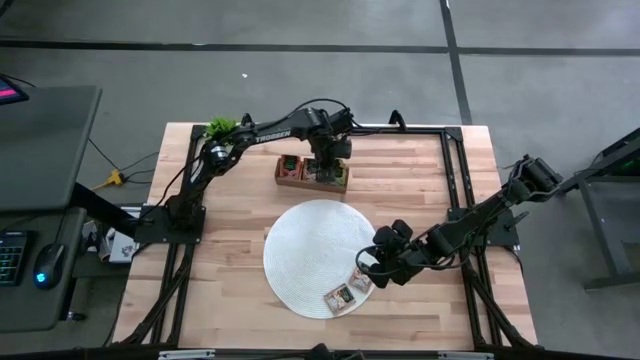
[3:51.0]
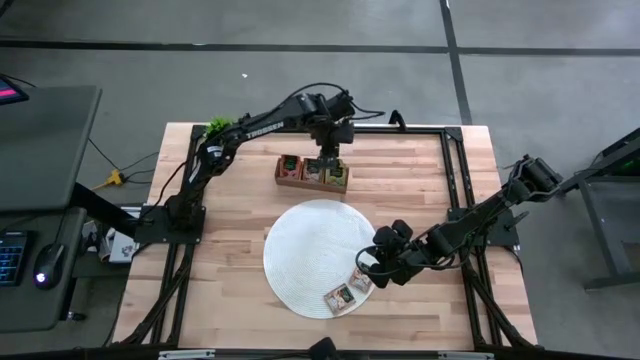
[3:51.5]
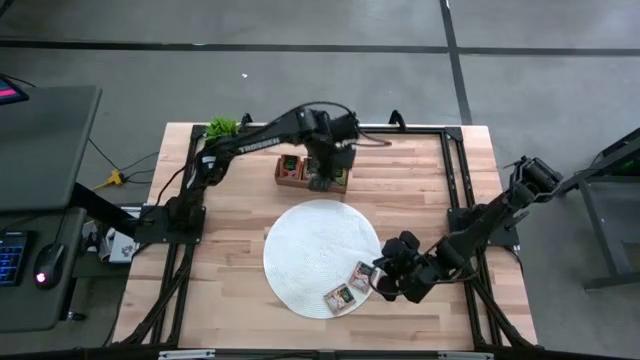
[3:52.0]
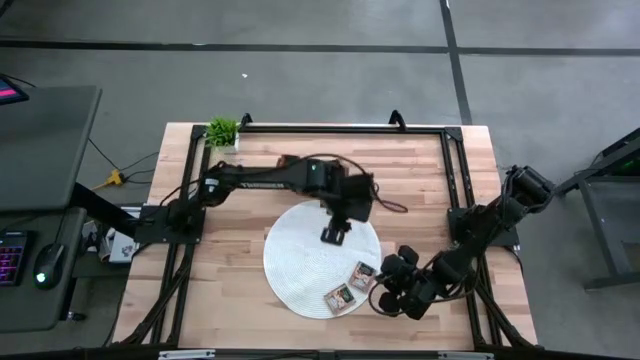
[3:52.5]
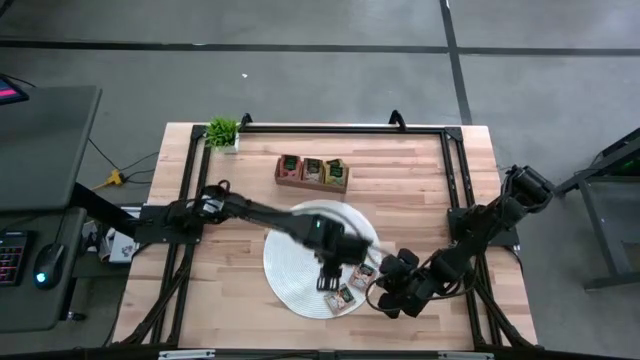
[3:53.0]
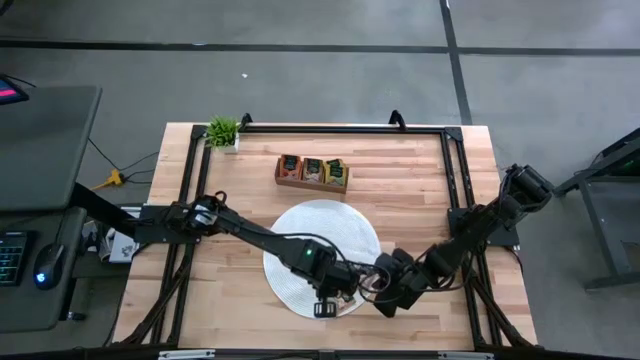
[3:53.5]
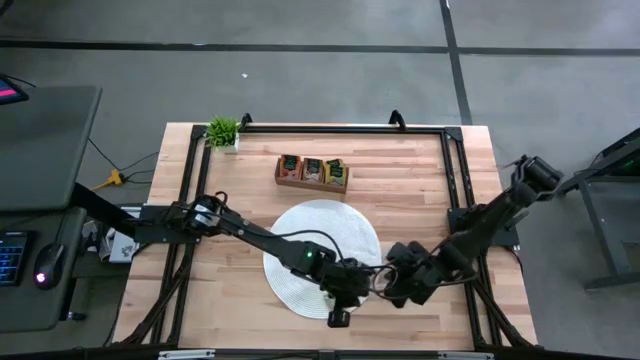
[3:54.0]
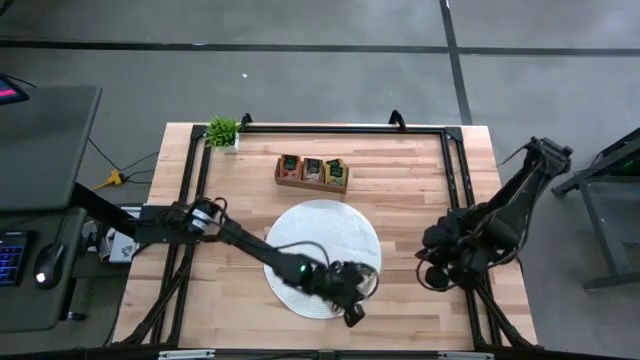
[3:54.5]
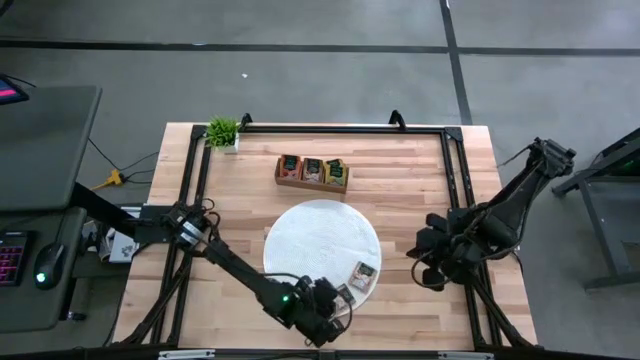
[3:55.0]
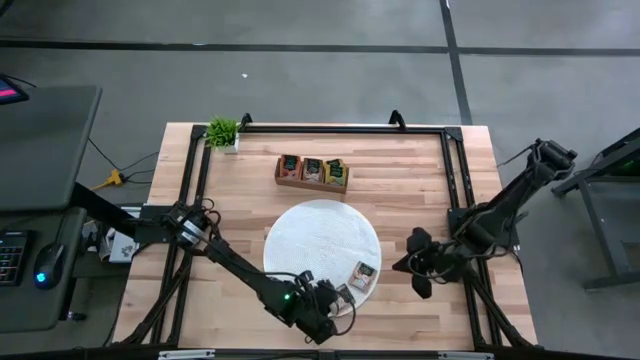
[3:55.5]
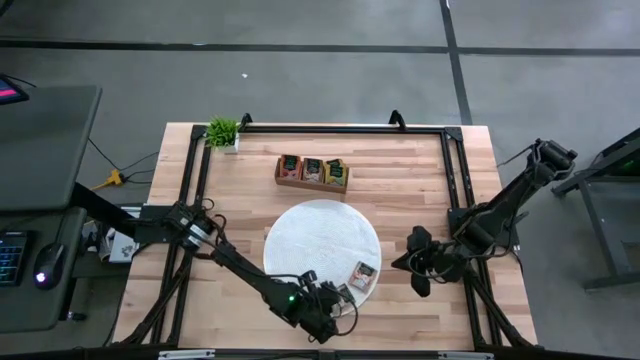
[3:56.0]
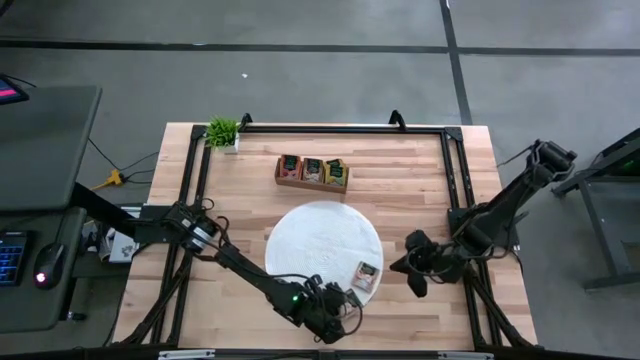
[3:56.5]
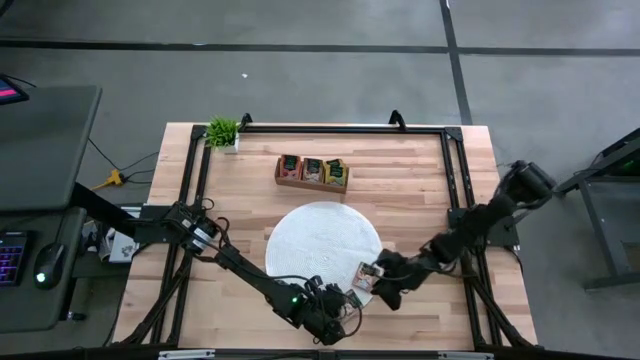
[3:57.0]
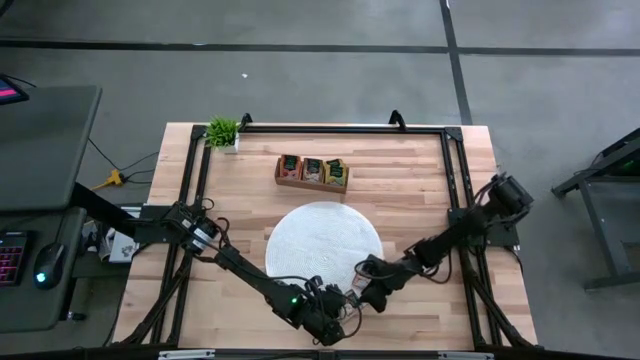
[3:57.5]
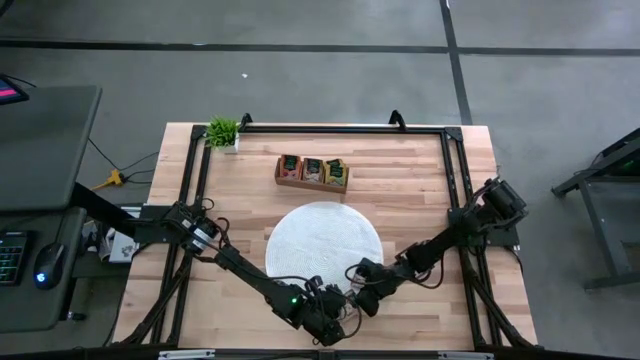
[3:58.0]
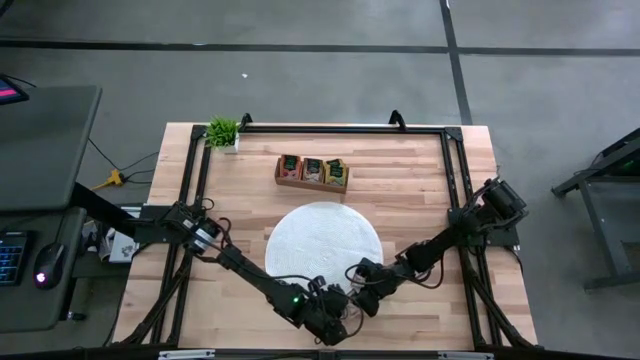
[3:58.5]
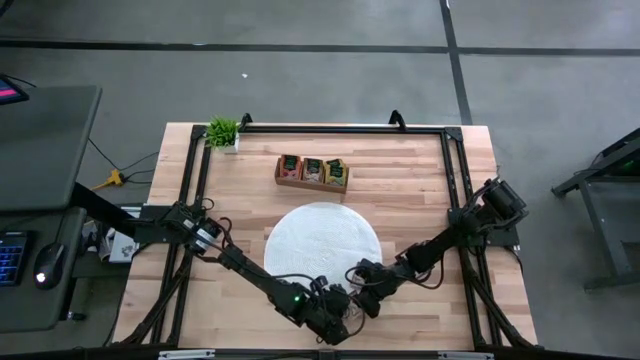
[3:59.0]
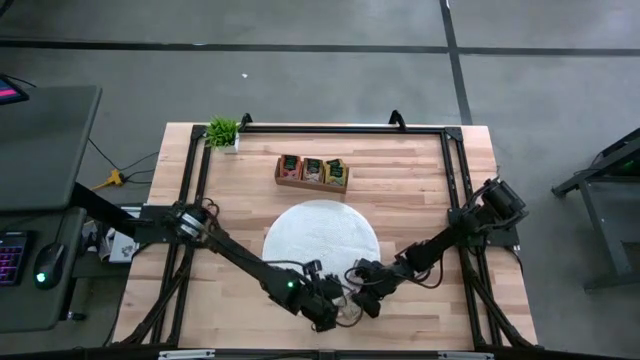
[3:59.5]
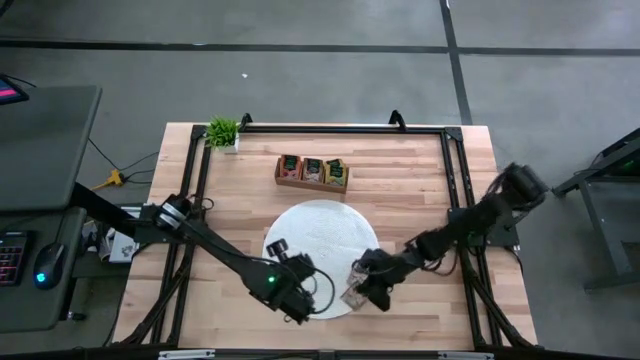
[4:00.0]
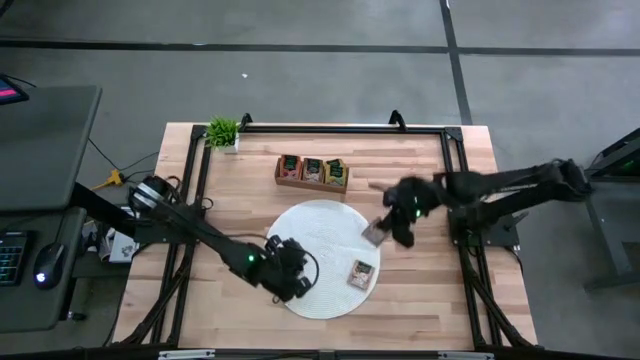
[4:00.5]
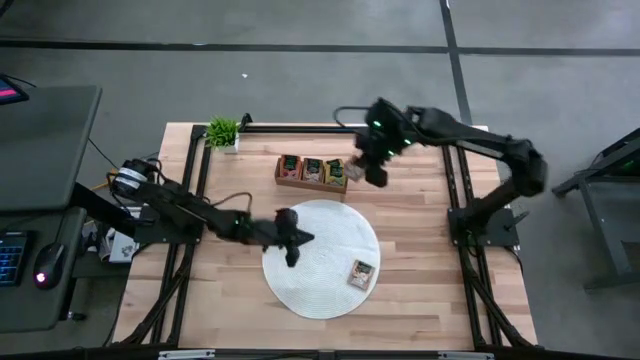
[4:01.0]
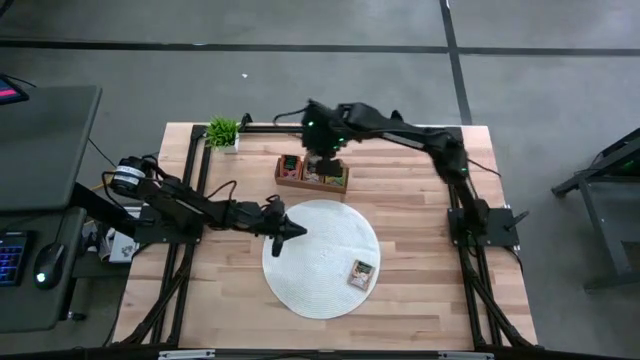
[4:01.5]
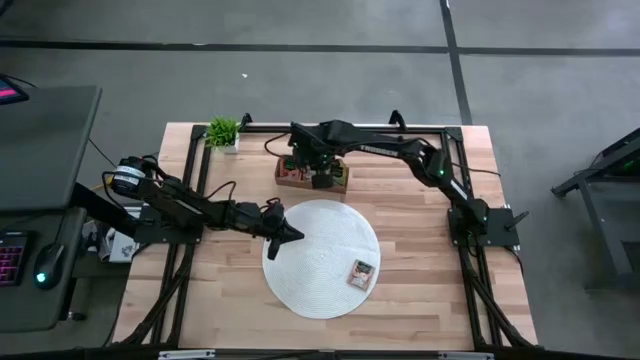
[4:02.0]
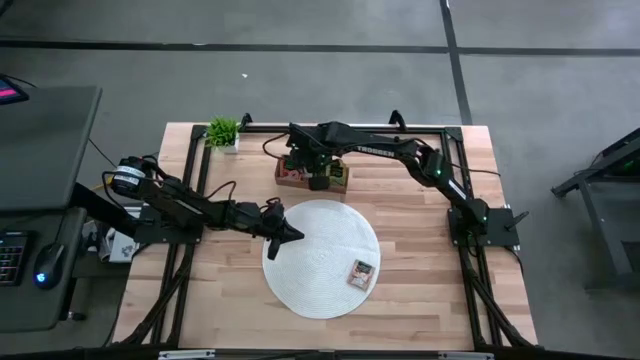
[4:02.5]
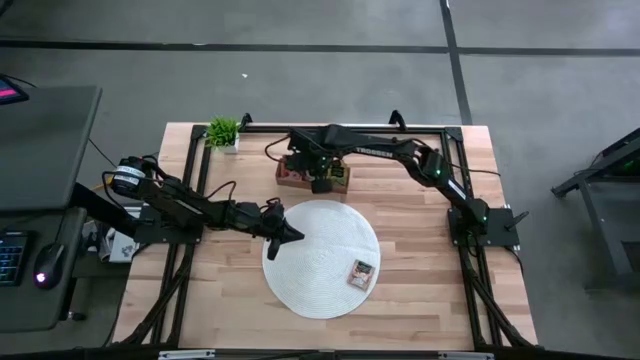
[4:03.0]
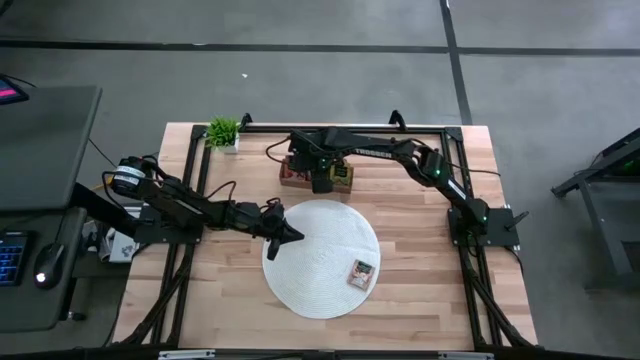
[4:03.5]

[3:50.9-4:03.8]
Task: Pick & Place Tea
Put the brown tea bag into the middle section of the wooden organizer

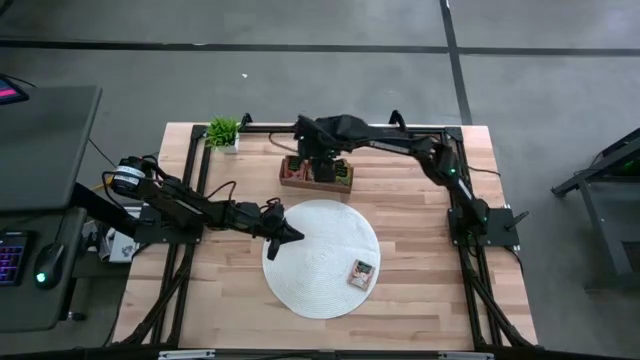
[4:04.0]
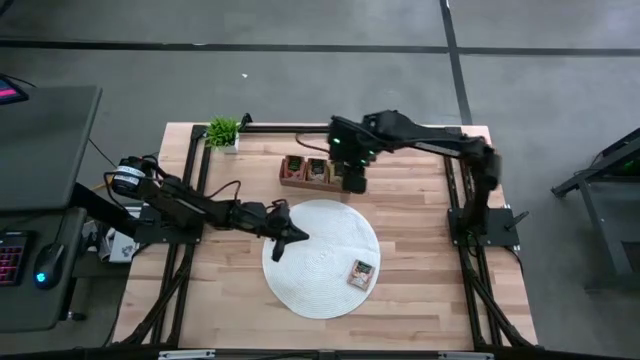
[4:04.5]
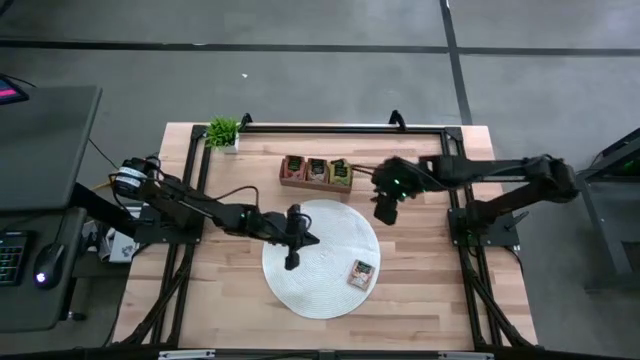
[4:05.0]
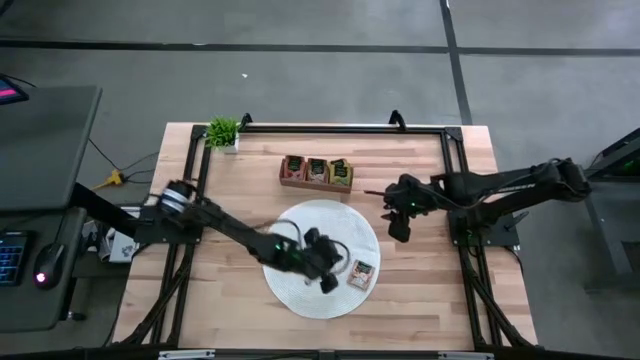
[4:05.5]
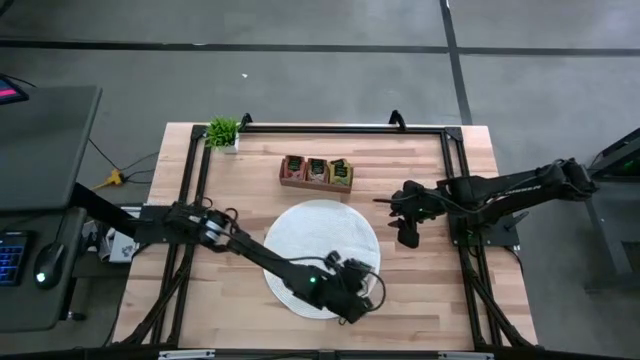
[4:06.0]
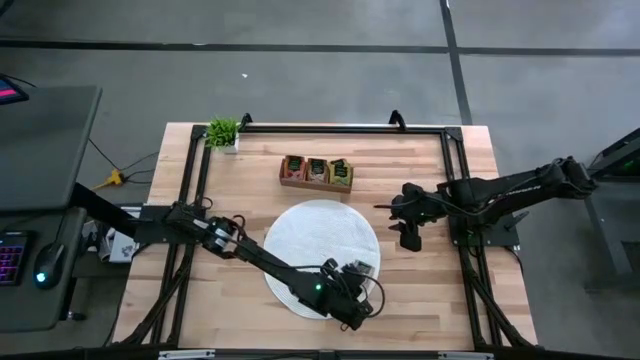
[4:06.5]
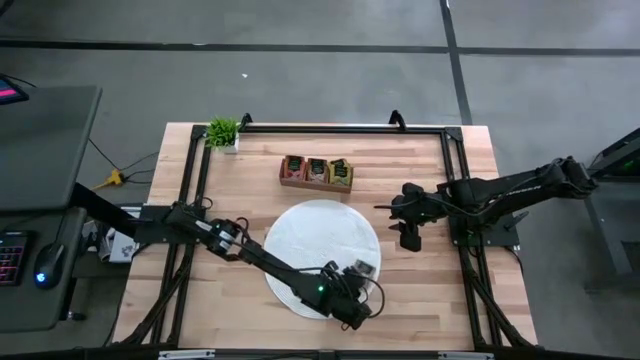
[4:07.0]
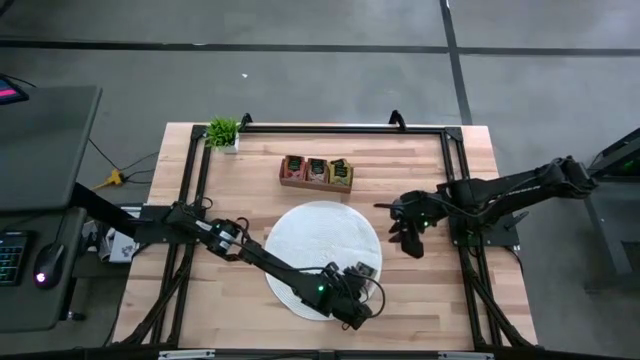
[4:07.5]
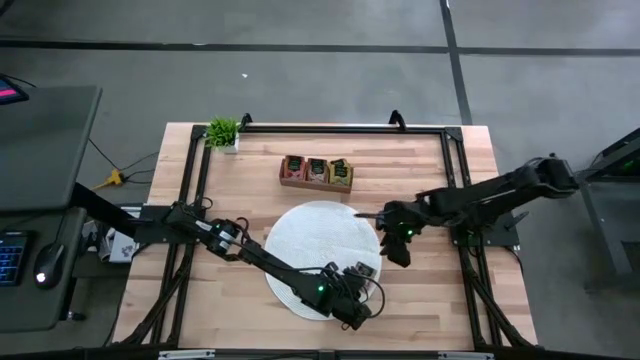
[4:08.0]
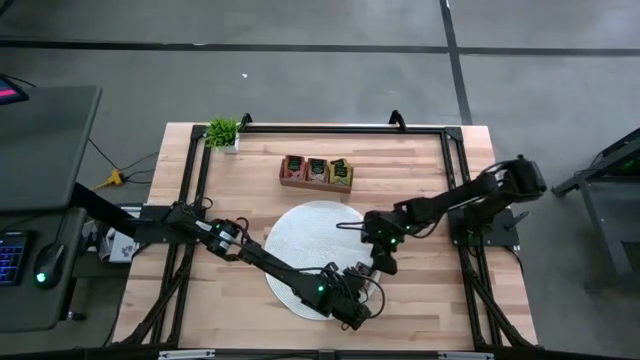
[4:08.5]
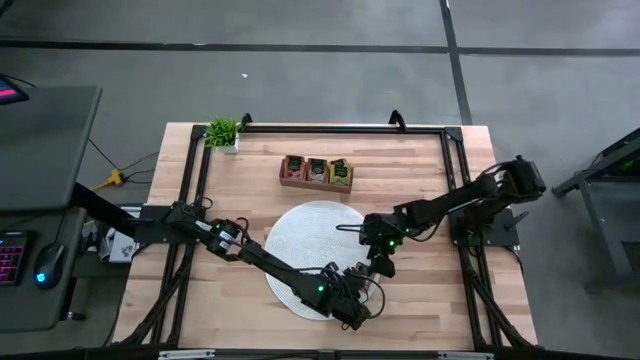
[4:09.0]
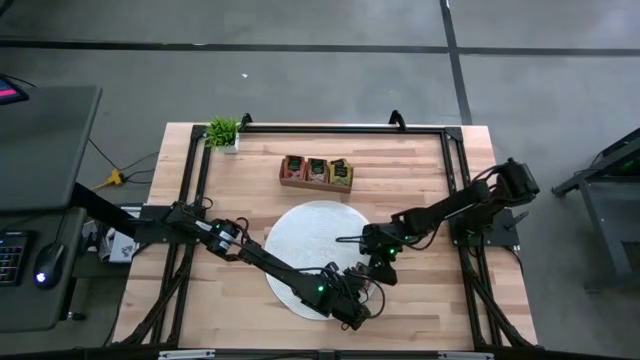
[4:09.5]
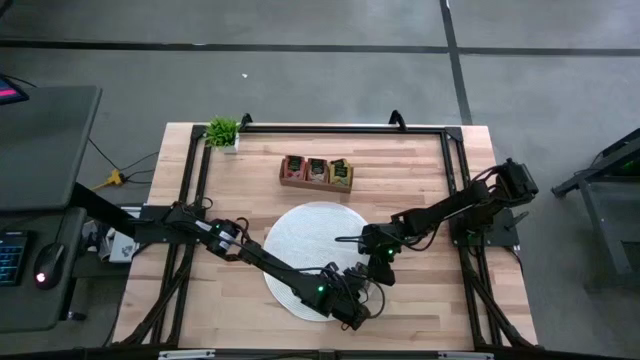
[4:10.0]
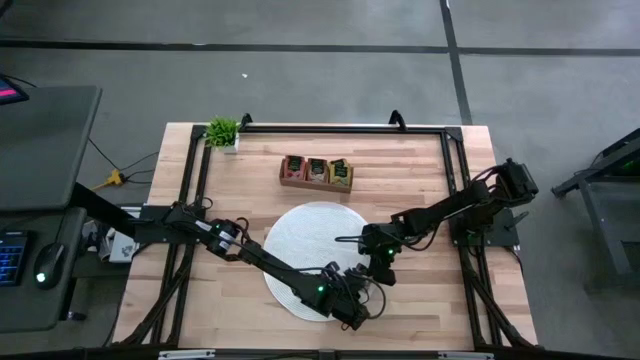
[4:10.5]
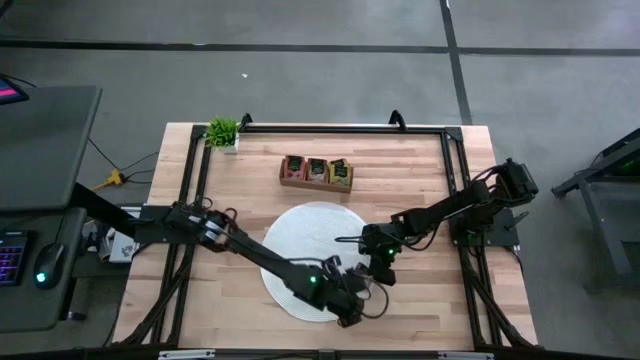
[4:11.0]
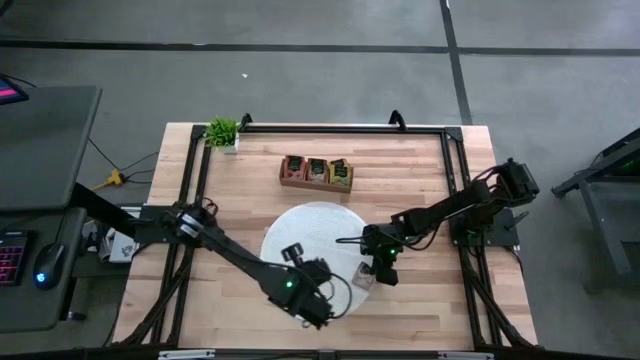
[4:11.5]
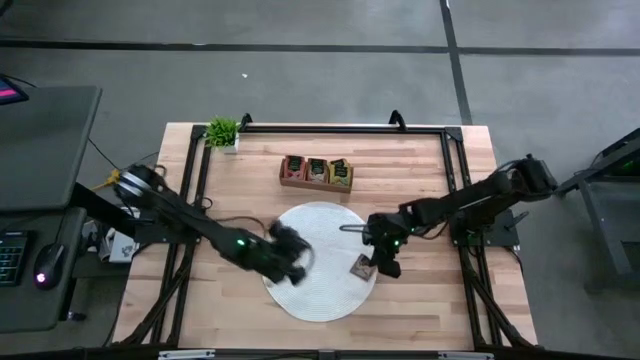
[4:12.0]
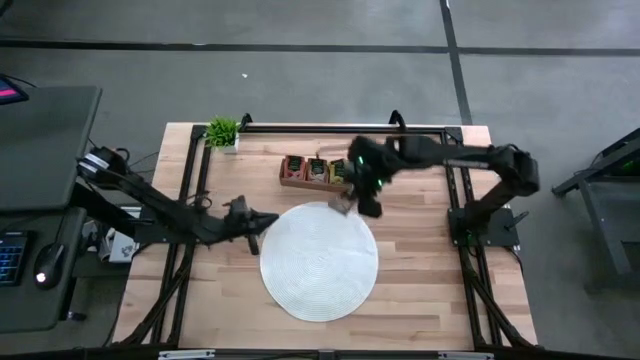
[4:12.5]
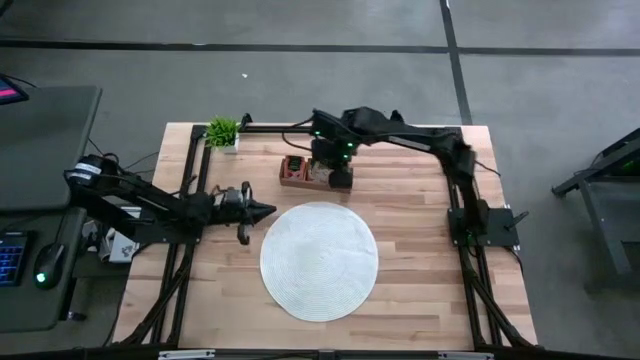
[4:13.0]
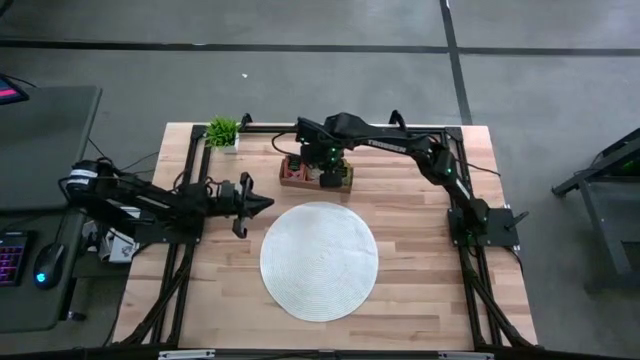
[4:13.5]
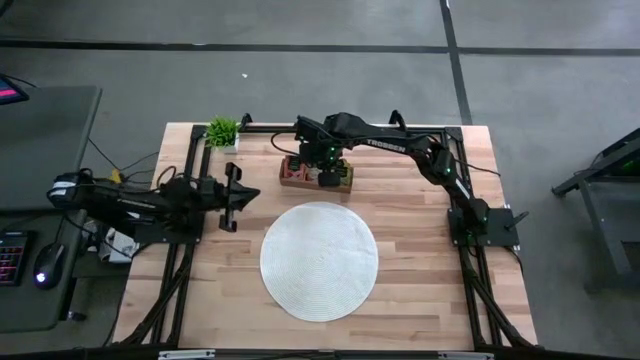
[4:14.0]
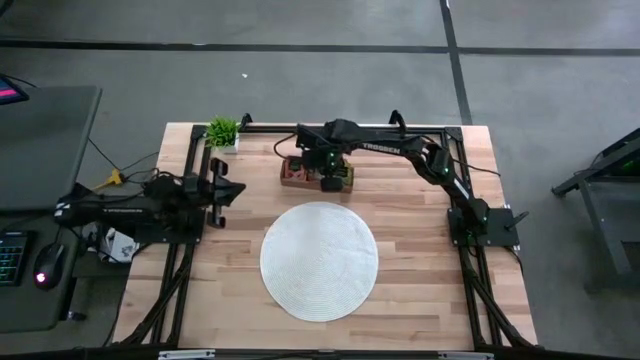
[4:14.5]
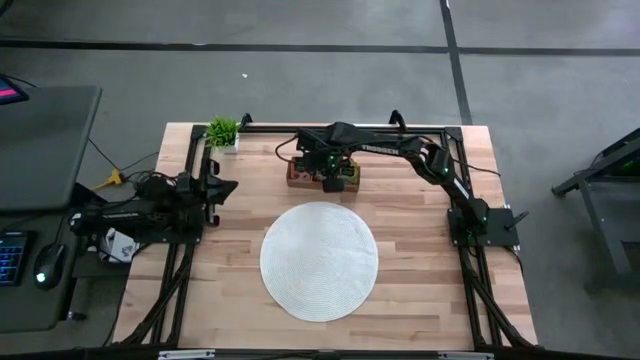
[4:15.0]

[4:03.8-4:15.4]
Put the brown tea bag into the middle section of the wooden organizer
